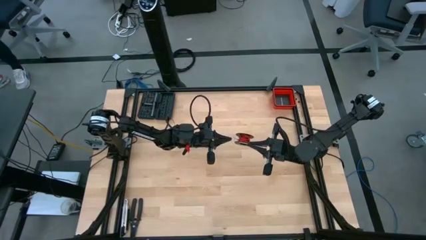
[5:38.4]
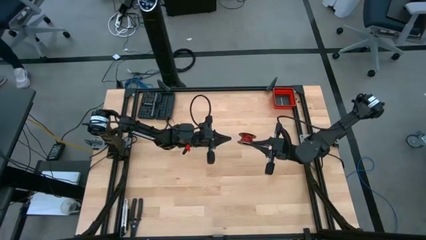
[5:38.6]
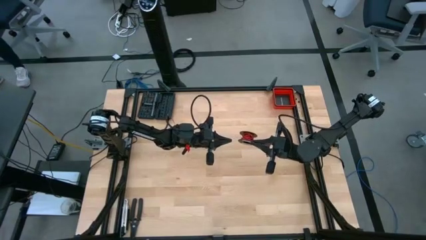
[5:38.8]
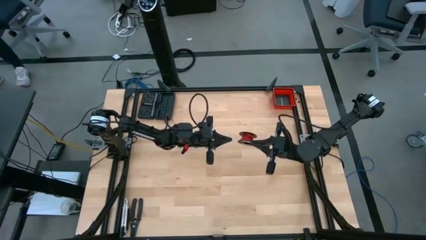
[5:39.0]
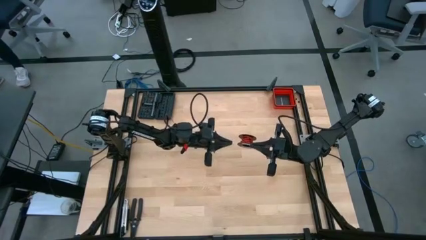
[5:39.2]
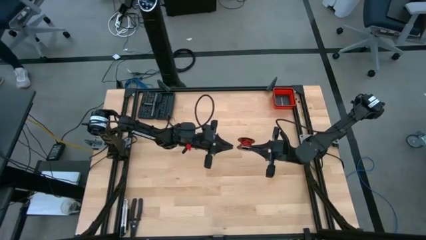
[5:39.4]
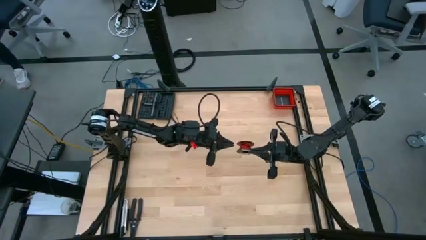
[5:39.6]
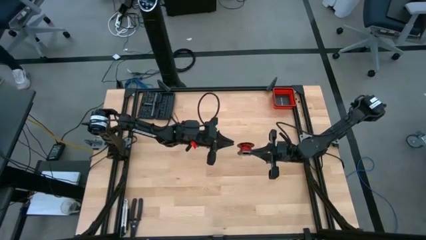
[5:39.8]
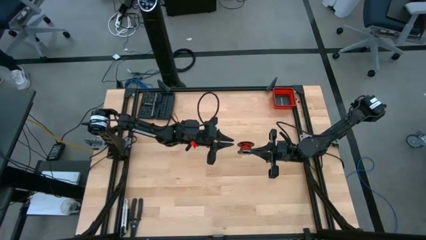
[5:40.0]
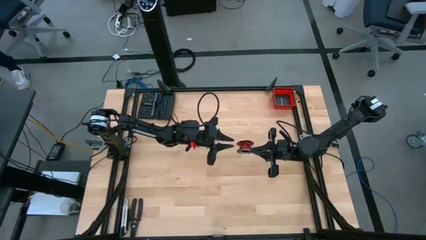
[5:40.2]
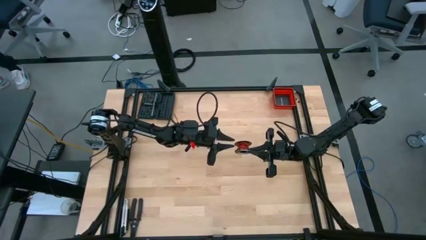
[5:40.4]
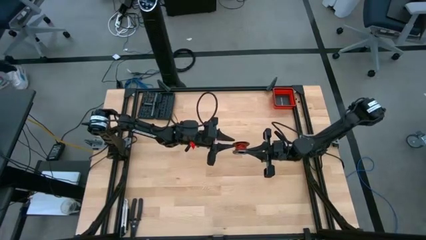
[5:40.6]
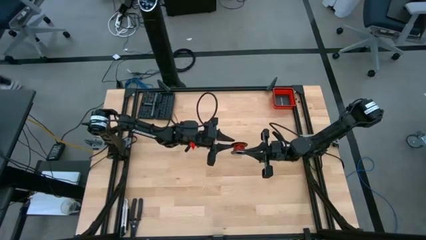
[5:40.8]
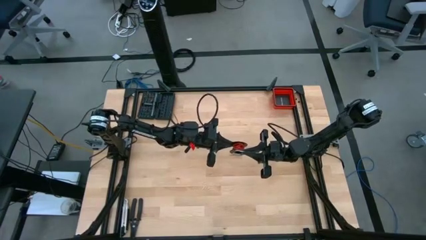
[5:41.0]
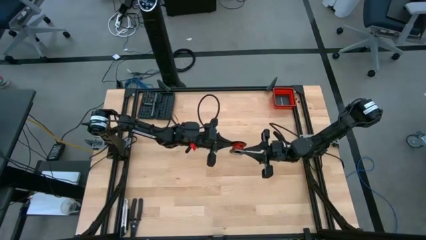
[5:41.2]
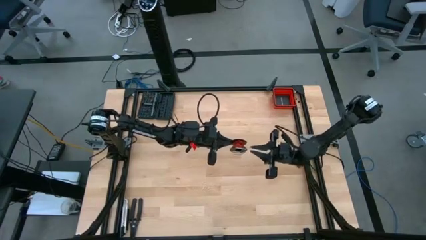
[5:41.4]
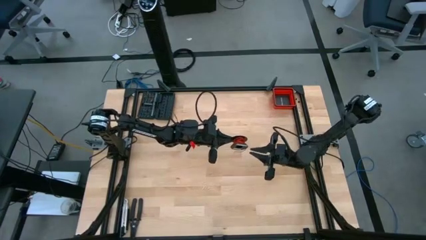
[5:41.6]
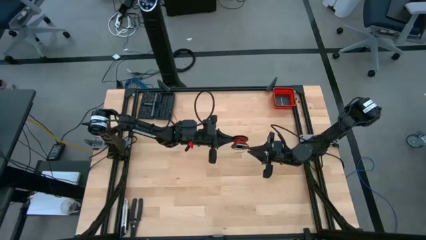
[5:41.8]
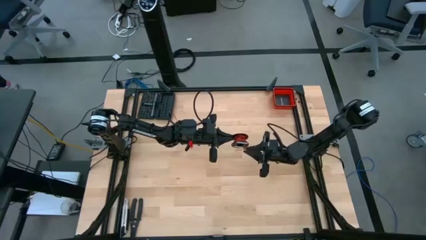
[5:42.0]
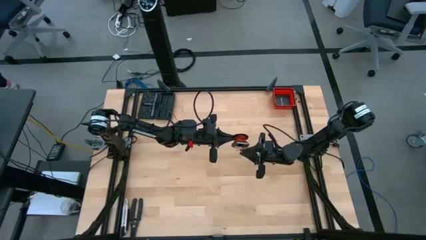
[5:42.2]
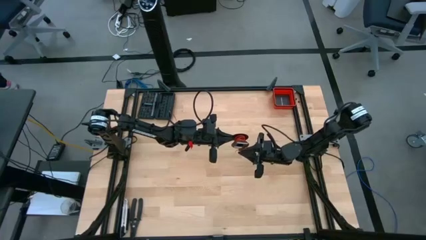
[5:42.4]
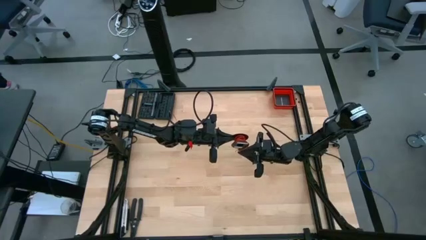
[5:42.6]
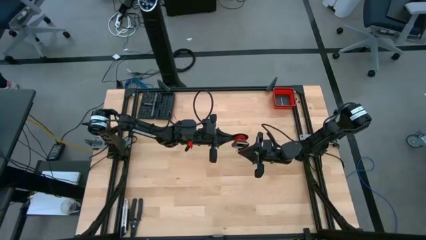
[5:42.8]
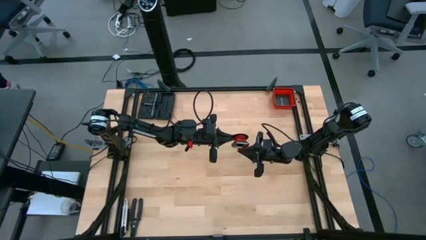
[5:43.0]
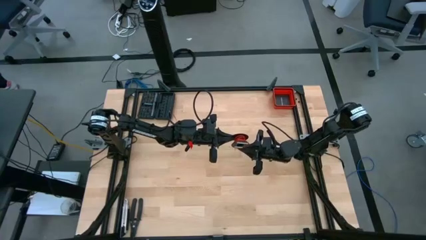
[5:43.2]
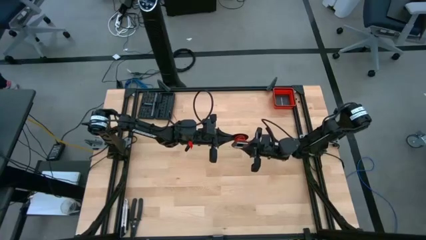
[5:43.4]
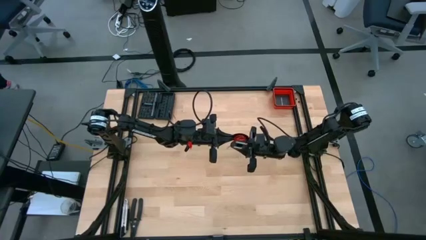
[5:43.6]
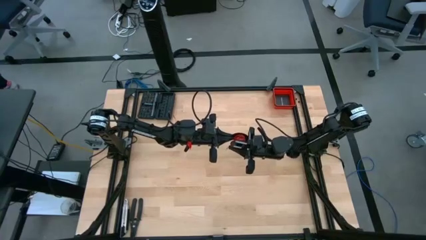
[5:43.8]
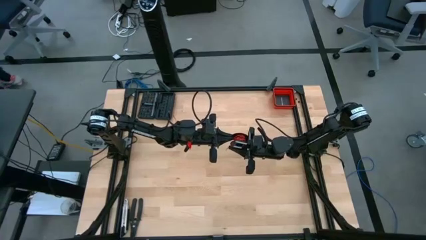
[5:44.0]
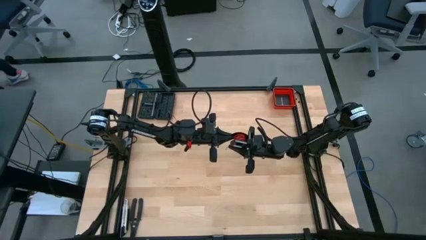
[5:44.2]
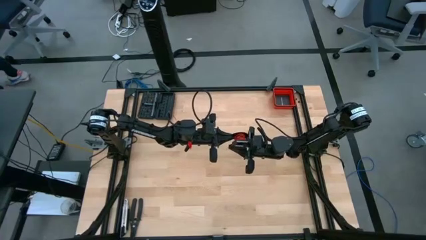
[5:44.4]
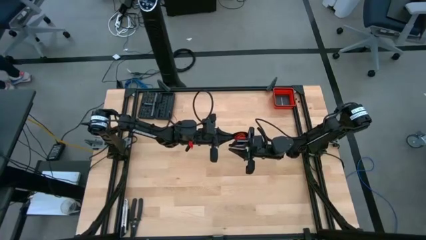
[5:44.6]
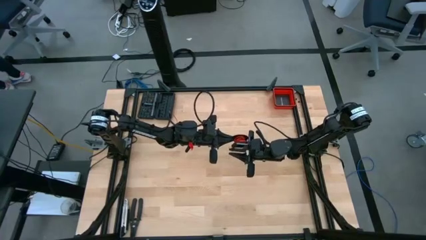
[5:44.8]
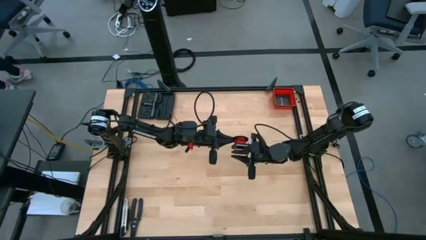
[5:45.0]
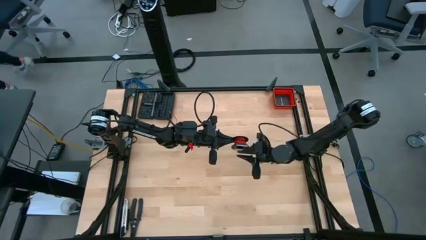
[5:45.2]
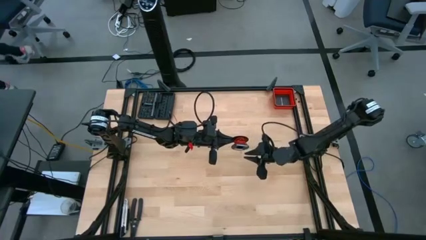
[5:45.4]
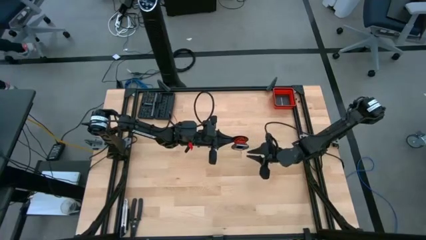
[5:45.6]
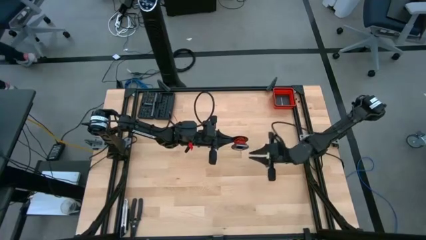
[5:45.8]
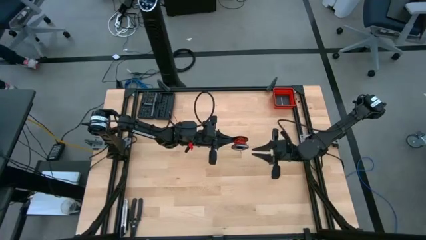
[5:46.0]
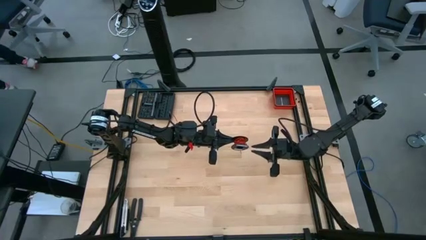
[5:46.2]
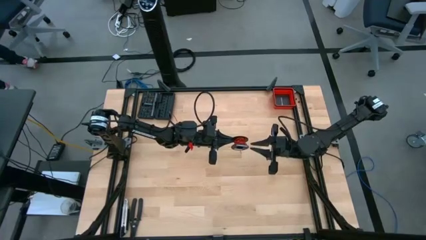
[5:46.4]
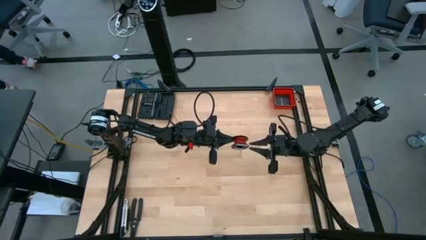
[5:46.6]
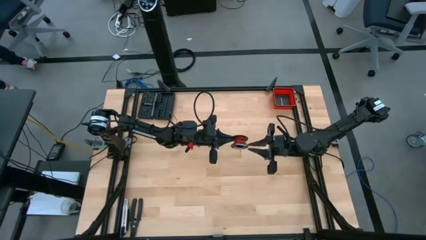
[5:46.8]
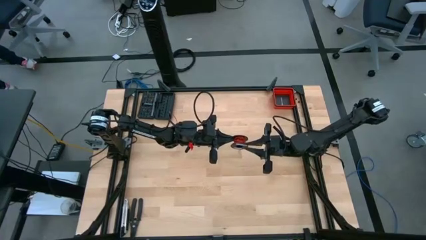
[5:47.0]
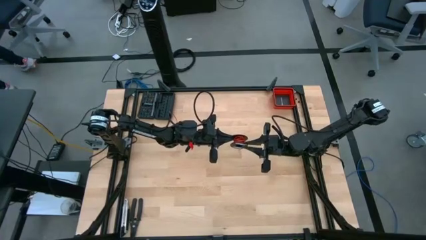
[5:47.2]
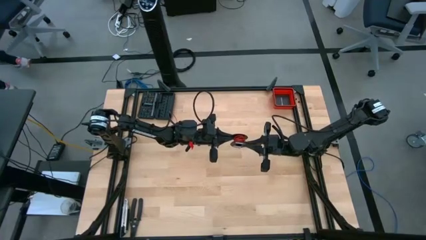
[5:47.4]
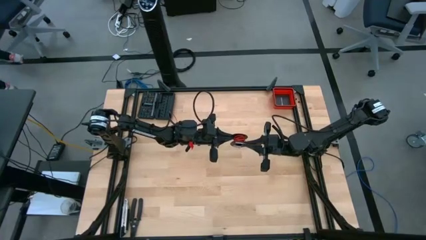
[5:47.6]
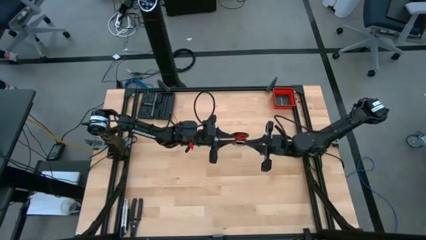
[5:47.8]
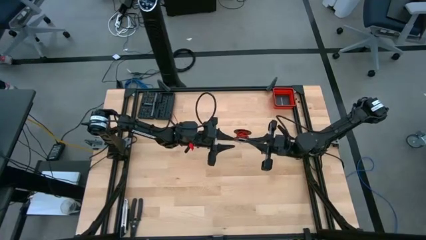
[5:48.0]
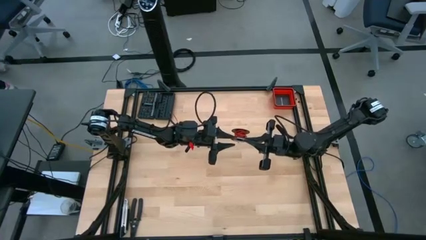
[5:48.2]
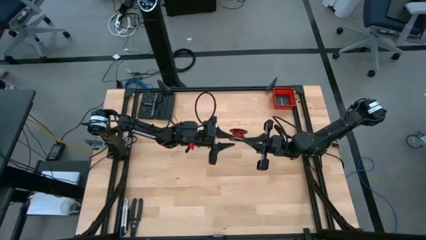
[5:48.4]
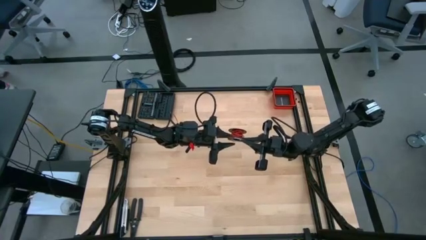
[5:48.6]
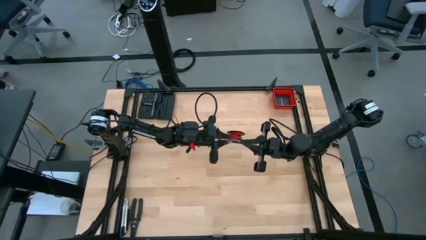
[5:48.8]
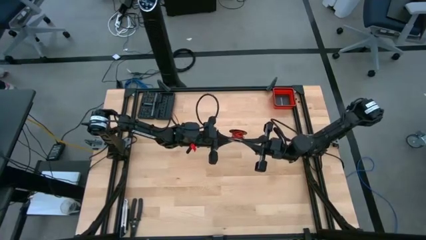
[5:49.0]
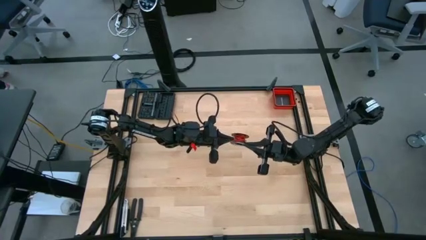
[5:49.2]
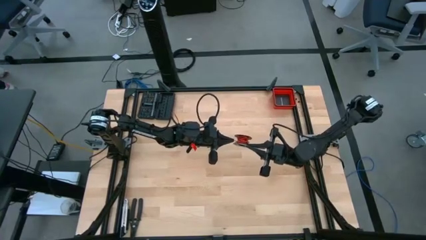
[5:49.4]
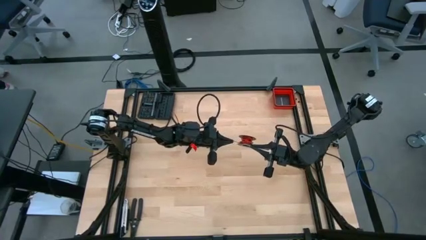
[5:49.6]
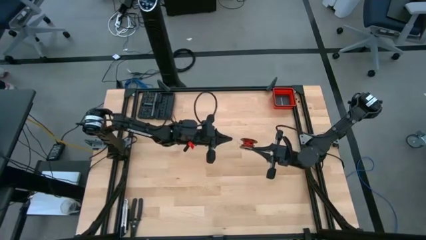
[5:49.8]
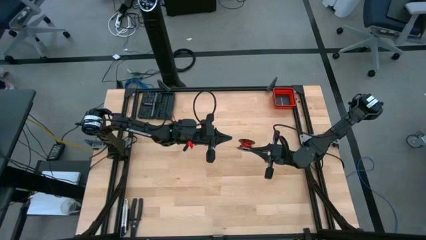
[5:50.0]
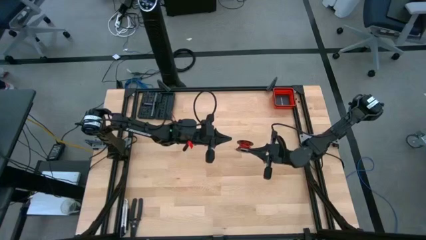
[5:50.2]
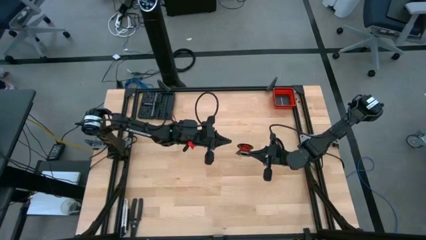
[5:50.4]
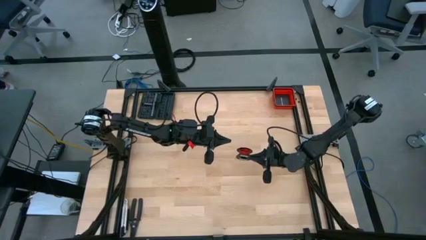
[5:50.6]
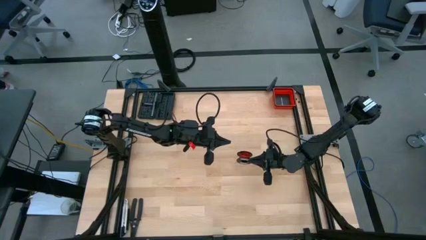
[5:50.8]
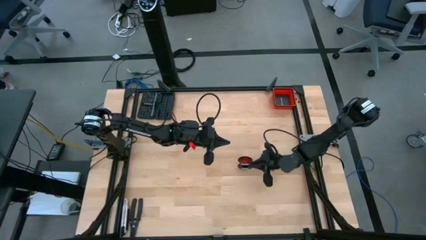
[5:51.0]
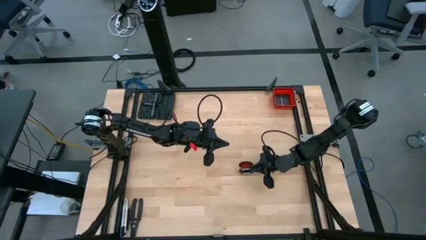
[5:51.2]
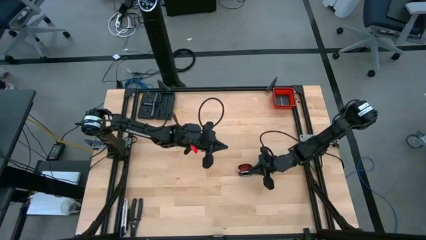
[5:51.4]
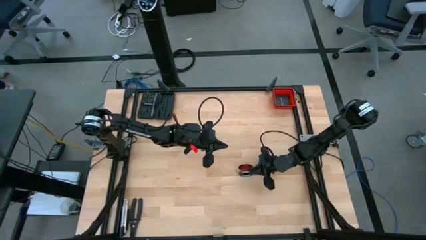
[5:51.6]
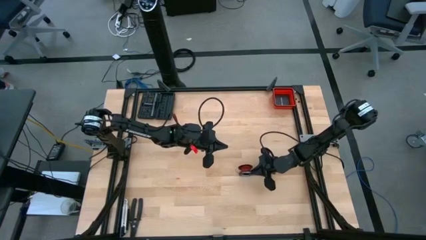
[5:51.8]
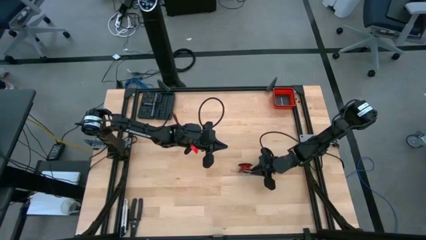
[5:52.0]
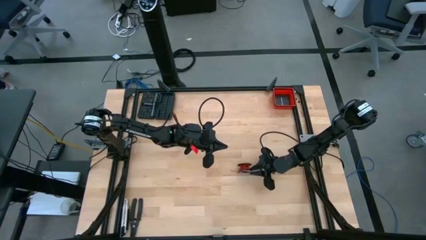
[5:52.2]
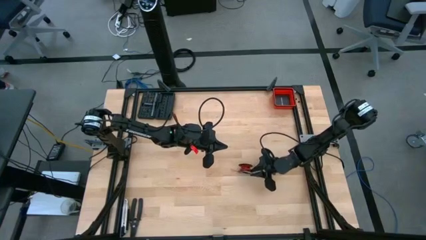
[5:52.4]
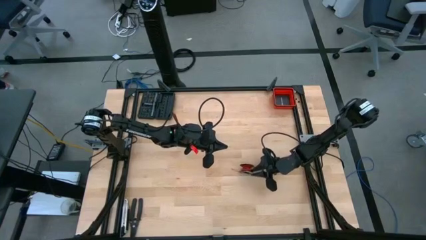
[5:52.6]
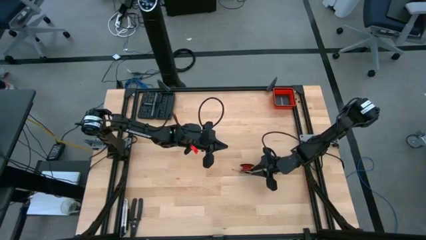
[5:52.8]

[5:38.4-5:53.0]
Task: Coil cords
Coil the red wire on the black spool
